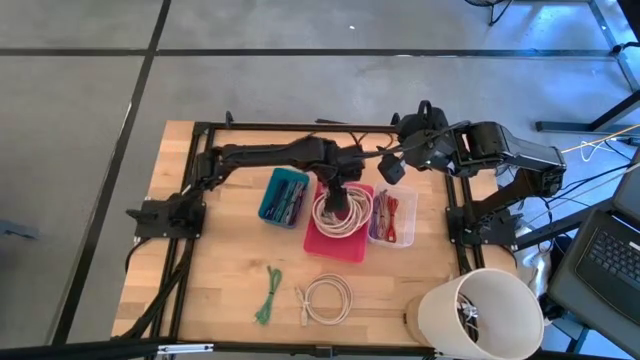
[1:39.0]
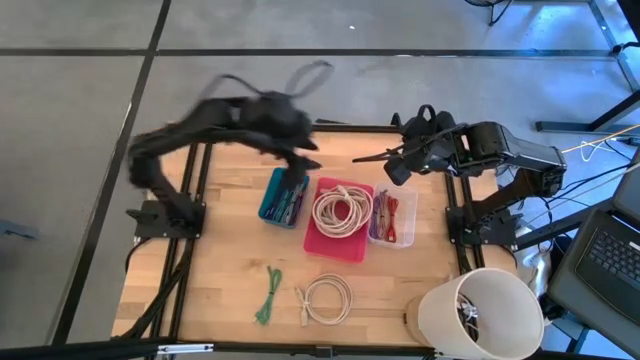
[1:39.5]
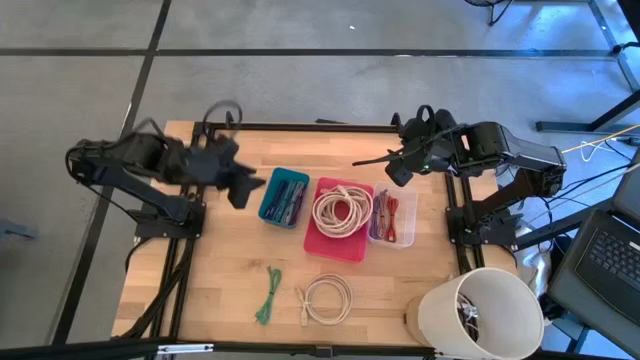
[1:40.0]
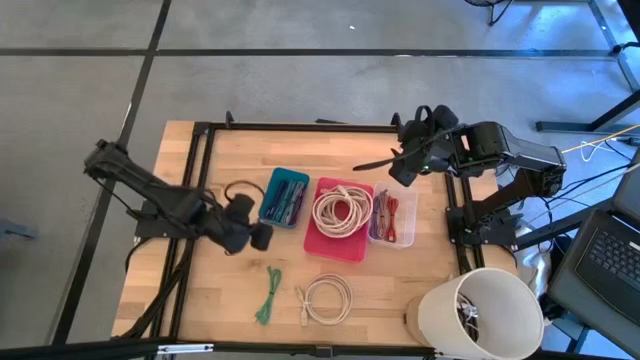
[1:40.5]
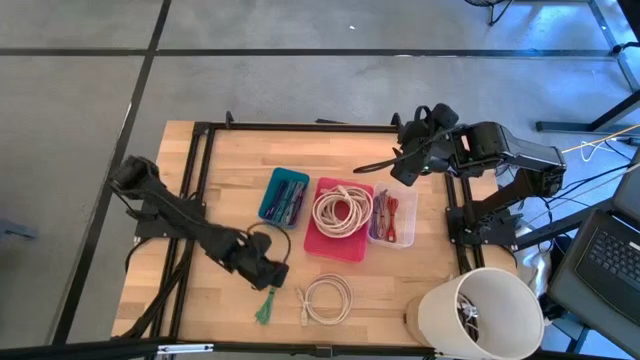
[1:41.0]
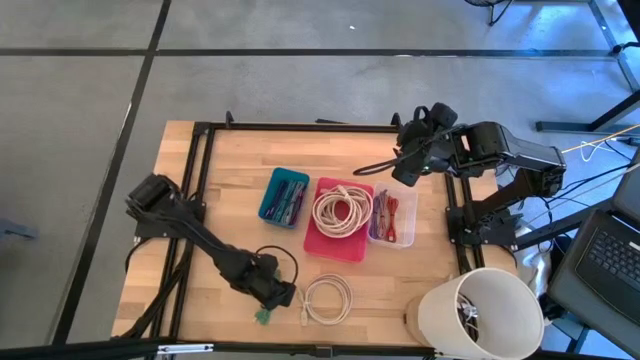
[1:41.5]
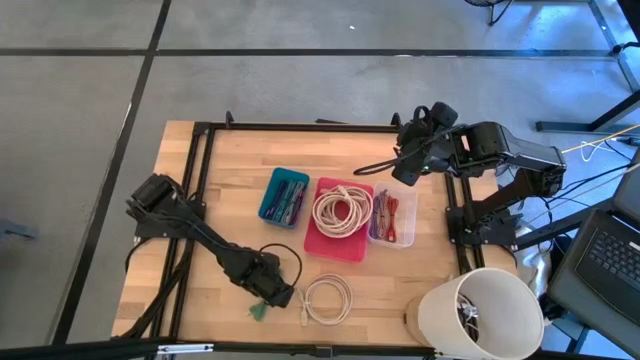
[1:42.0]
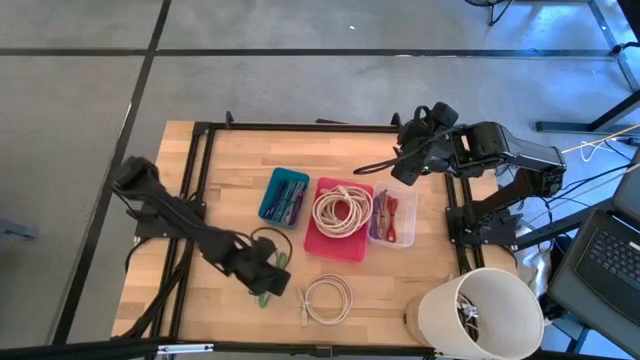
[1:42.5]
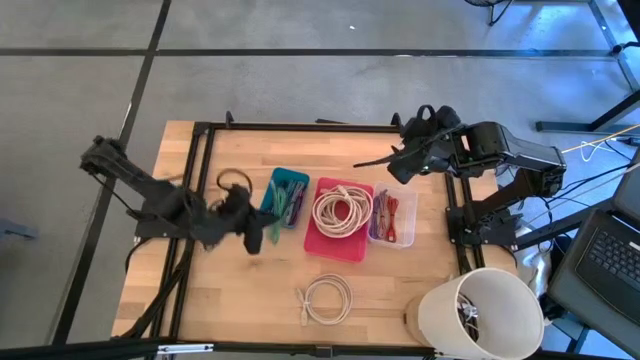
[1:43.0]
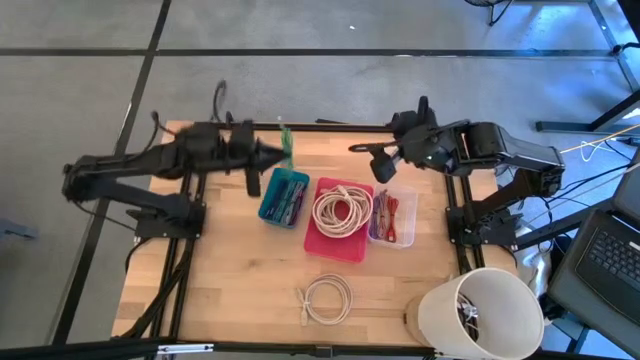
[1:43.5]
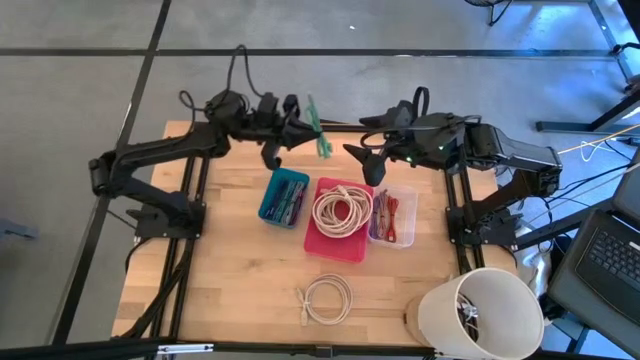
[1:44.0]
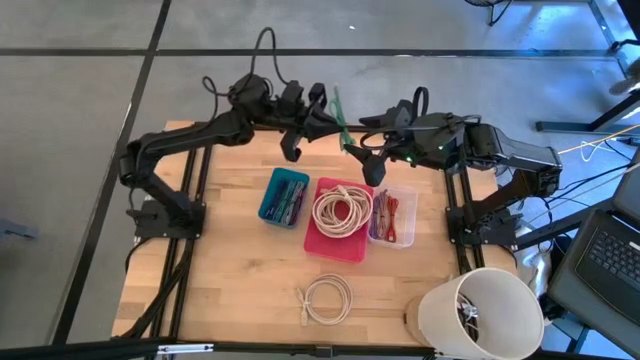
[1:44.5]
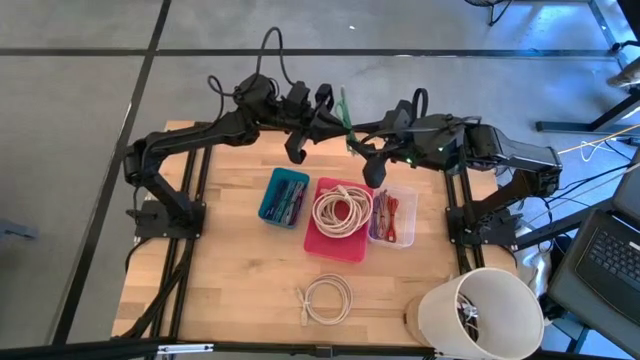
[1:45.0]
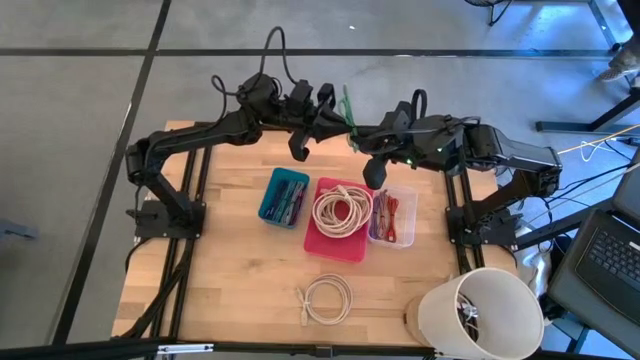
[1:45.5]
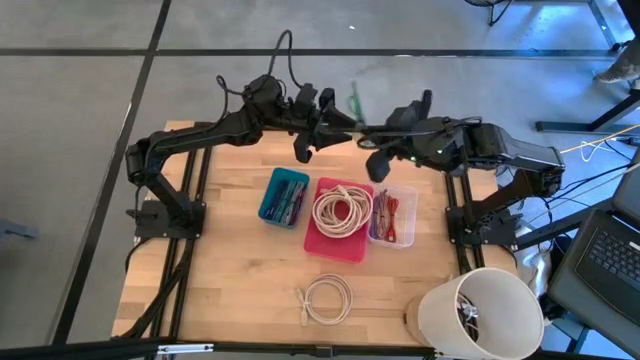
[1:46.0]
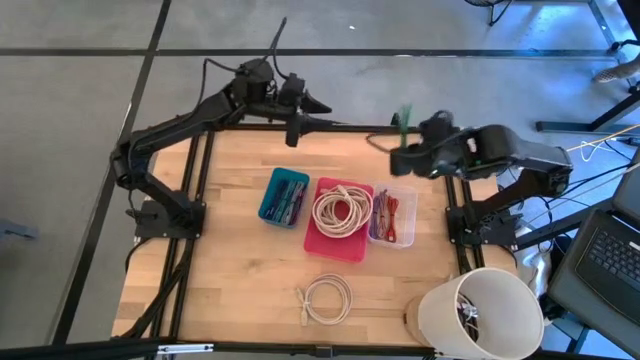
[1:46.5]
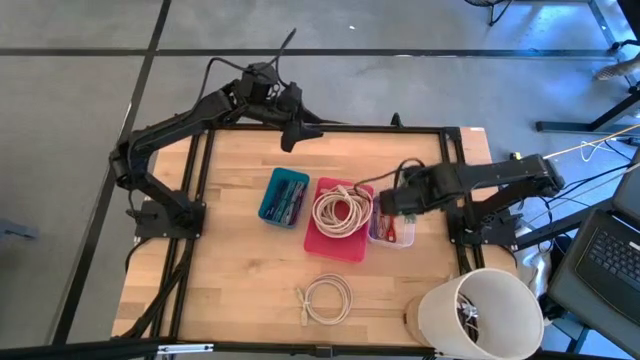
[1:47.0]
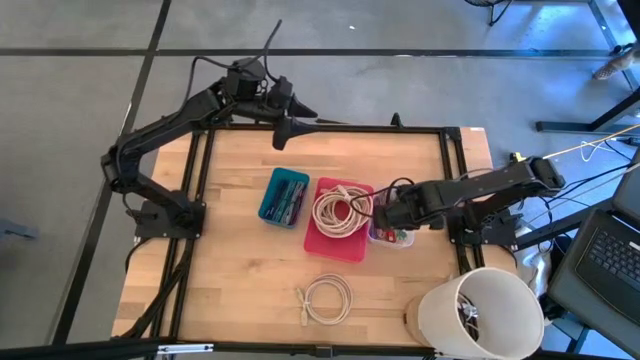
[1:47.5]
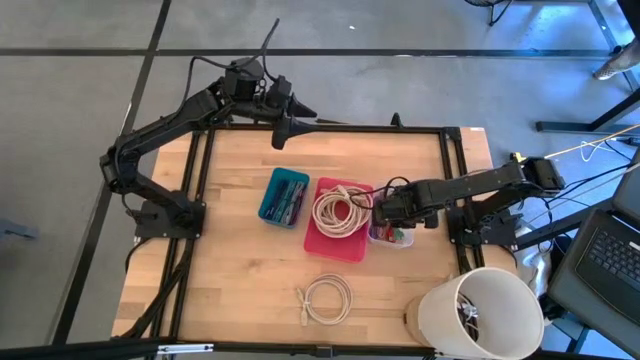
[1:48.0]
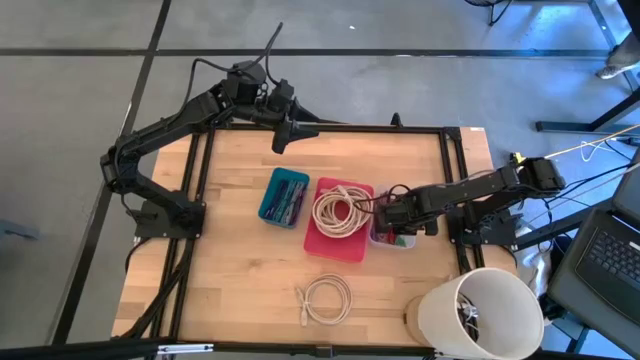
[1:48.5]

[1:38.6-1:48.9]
Task: Pick & Place USB Port
Put the green charger cable into the transparent bin

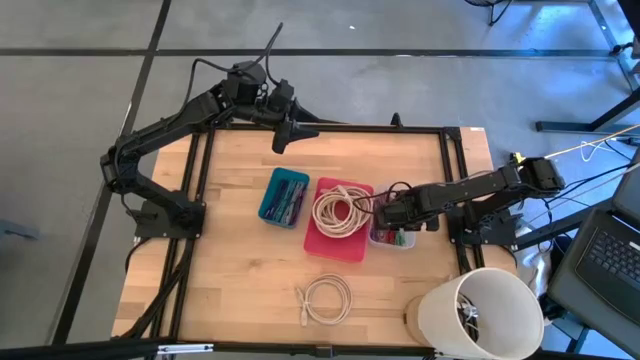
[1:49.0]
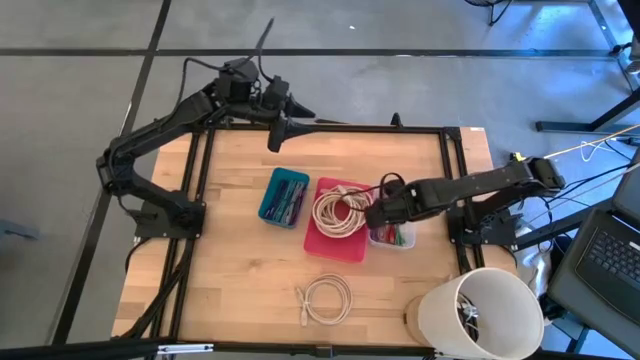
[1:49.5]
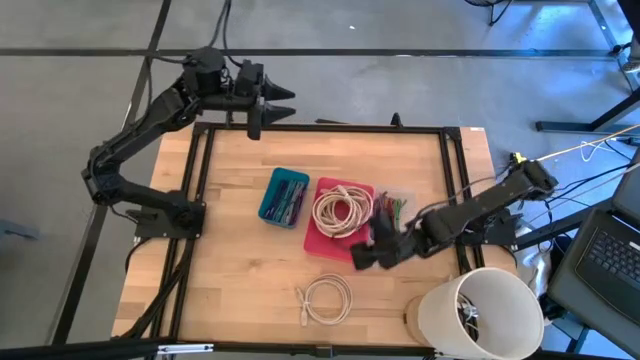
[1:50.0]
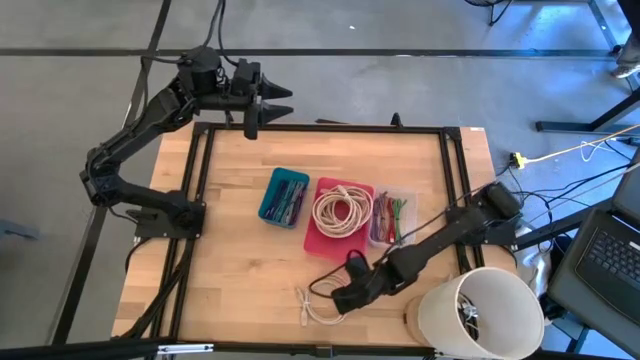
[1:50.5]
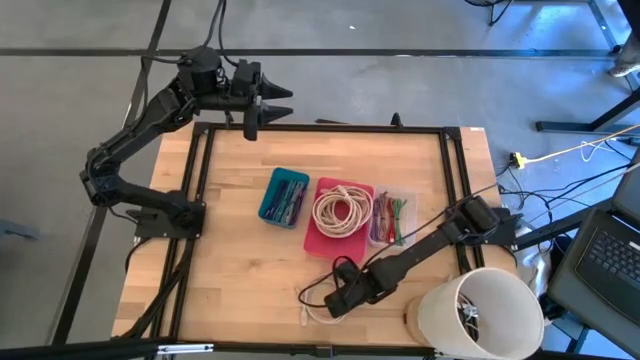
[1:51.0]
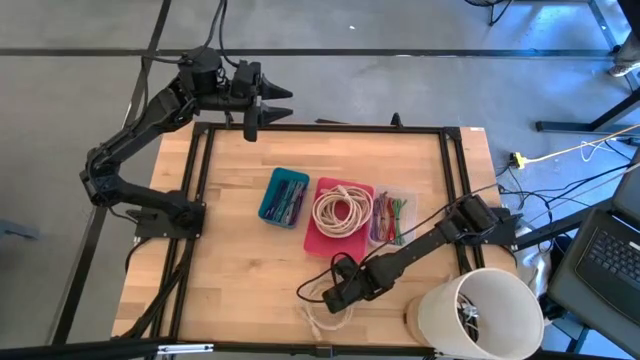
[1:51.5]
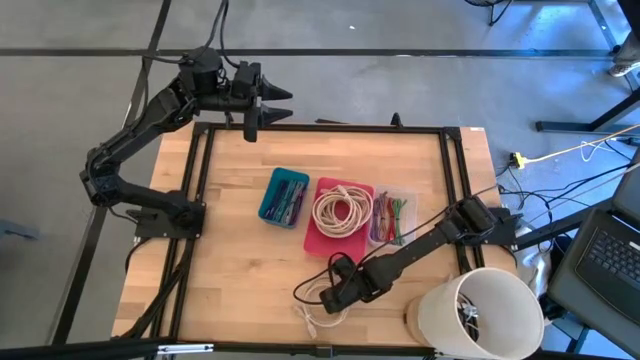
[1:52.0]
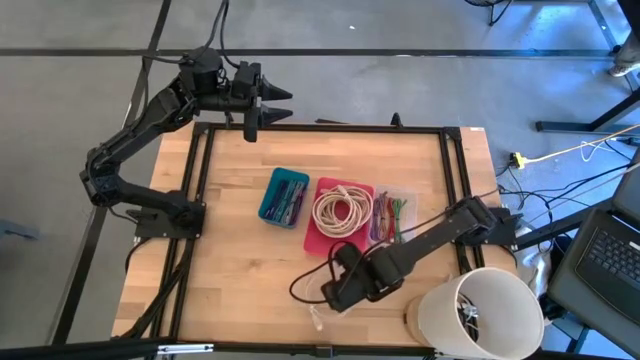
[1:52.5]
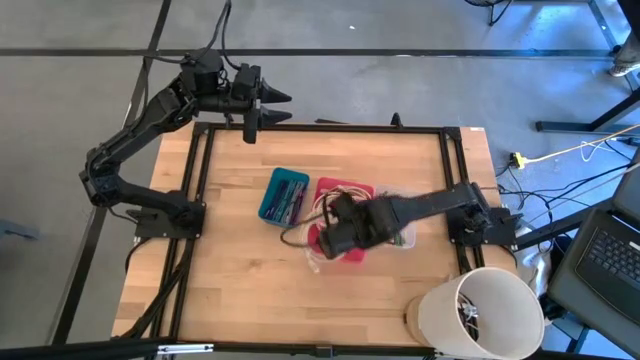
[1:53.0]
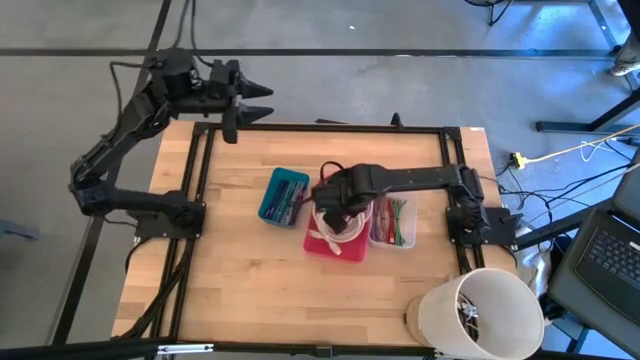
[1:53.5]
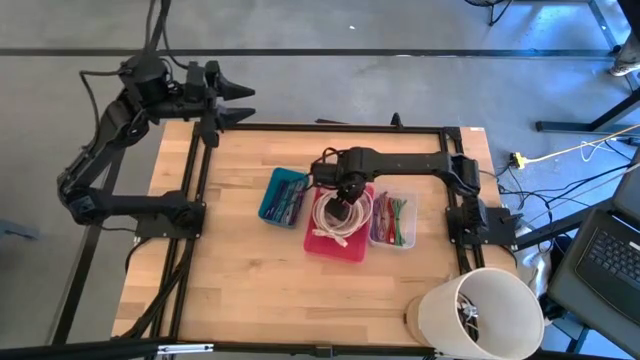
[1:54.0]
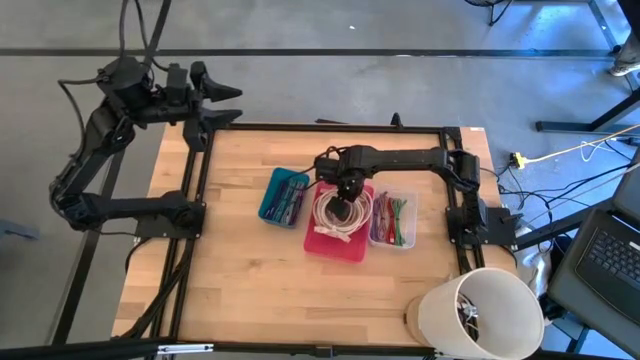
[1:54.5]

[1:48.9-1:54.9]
Put the white charger cable into the pink bin

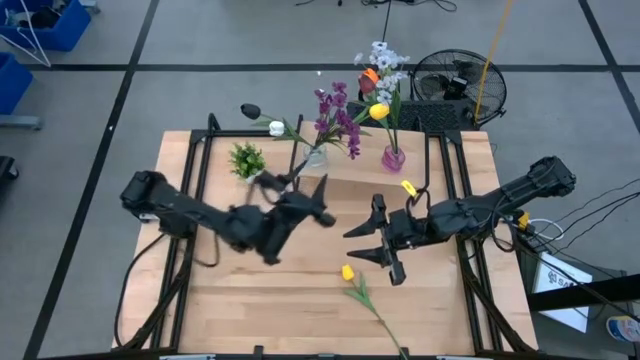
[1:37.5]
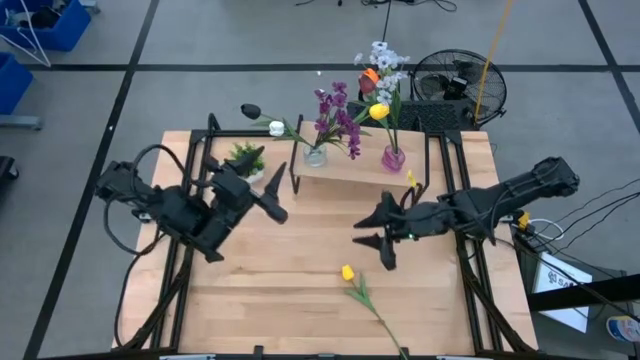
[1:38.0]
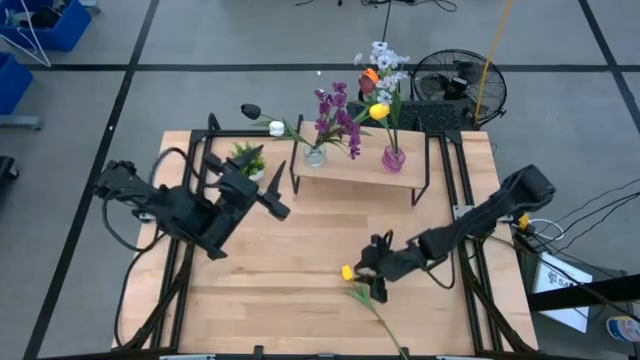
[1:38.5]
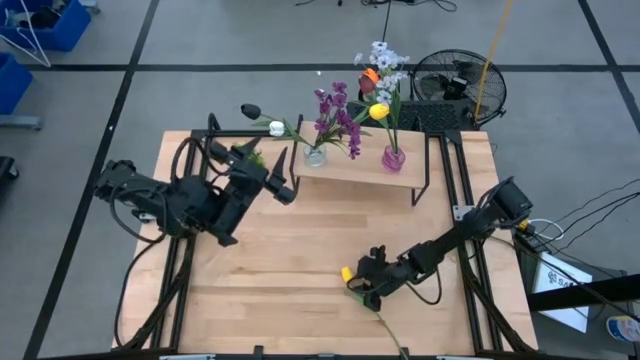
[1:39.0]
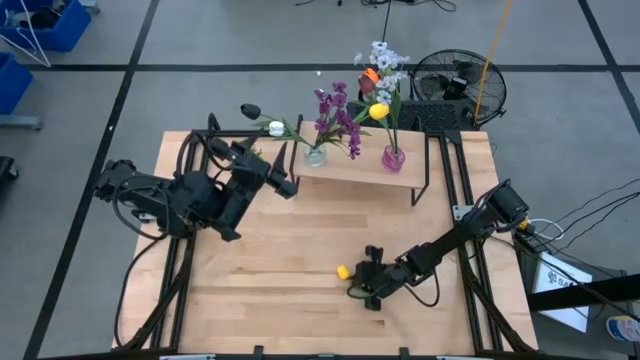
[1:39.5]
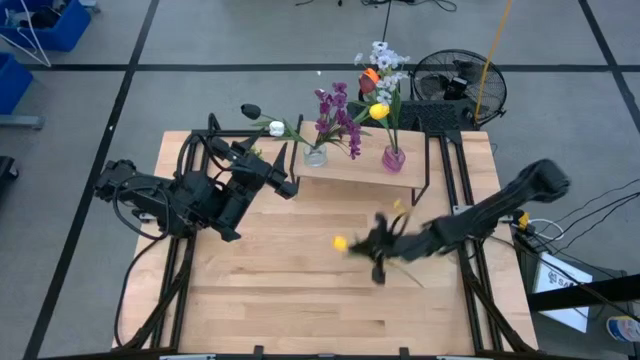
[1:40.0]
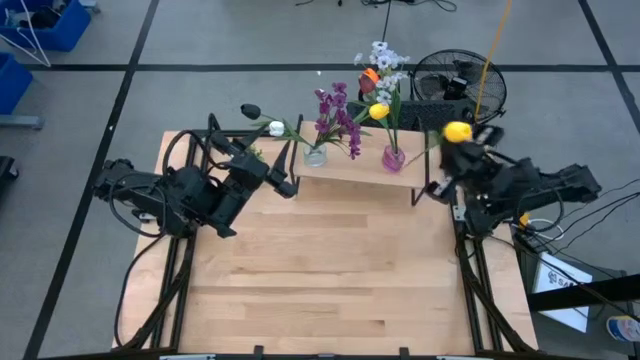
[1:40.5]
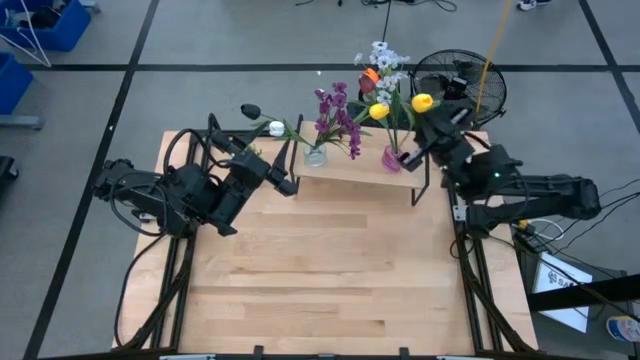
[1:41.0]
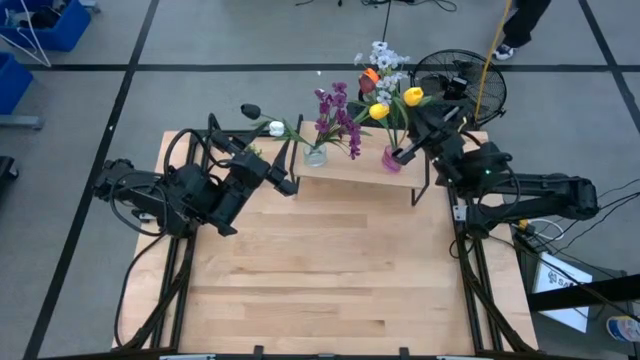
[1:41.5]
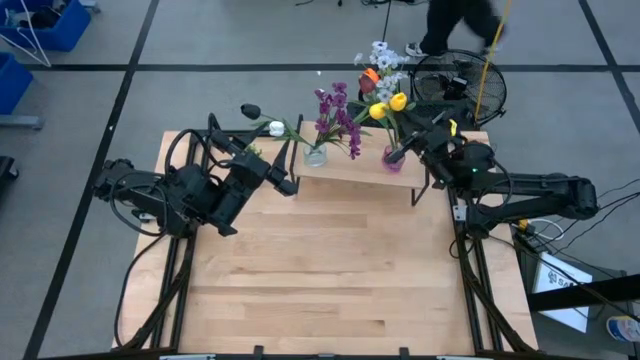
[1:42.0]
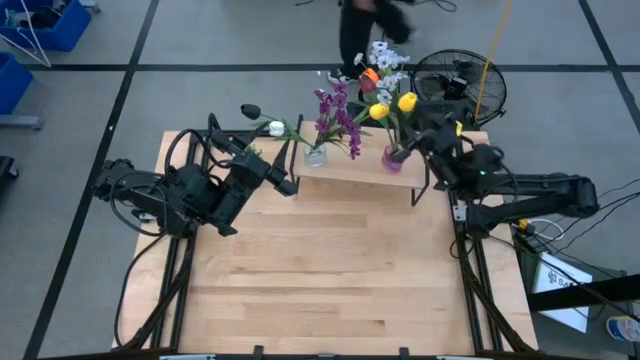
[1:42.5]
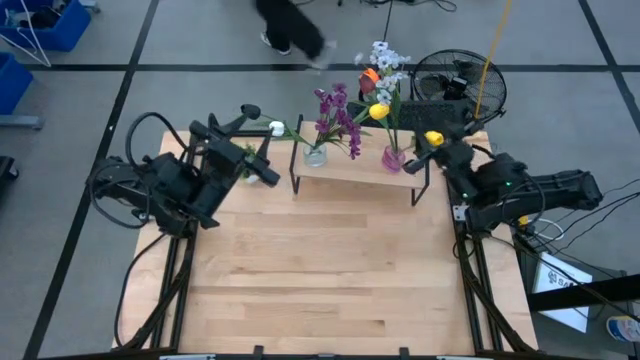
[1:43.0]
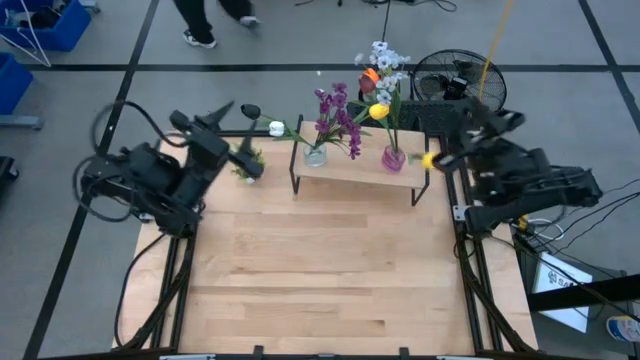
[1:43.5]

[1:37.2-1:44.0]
Task: Pick and place flowers into a vace then onto a shelf
Put the yellow tulip into the purple vase
